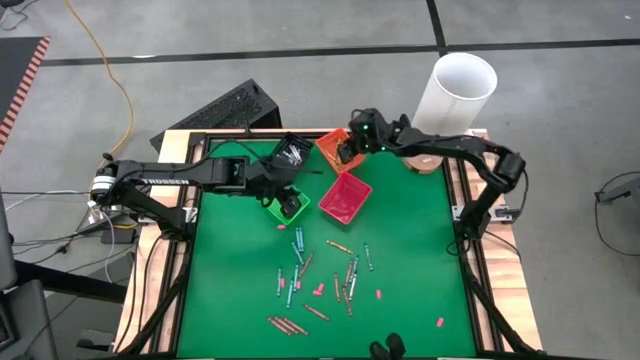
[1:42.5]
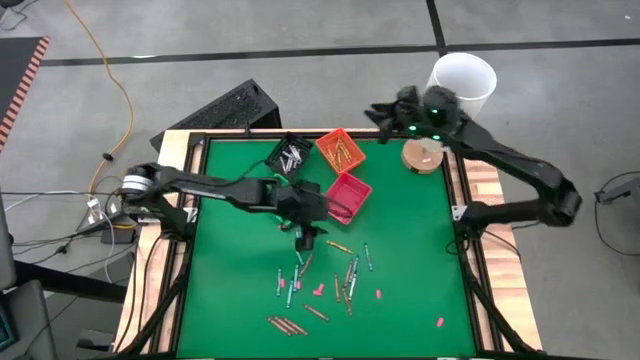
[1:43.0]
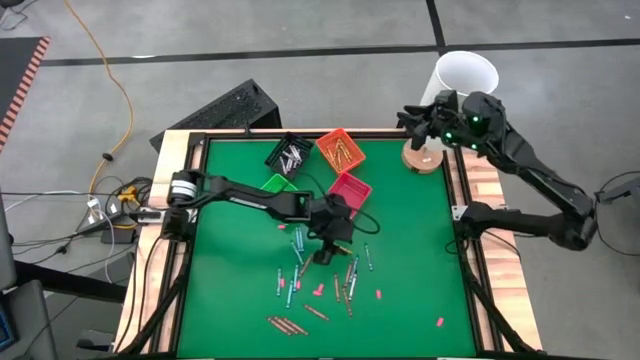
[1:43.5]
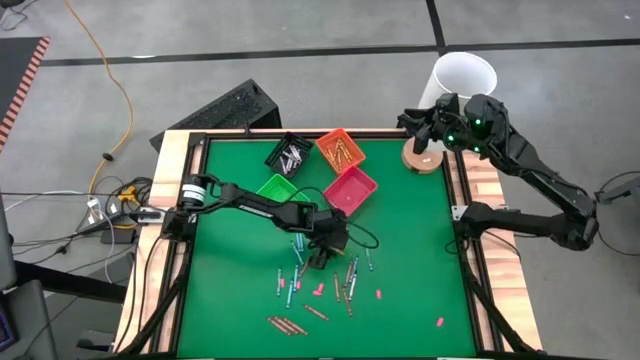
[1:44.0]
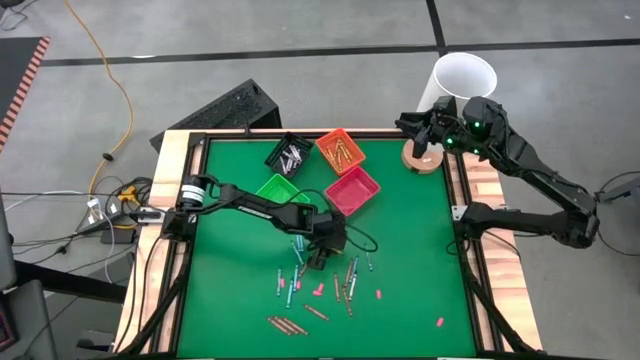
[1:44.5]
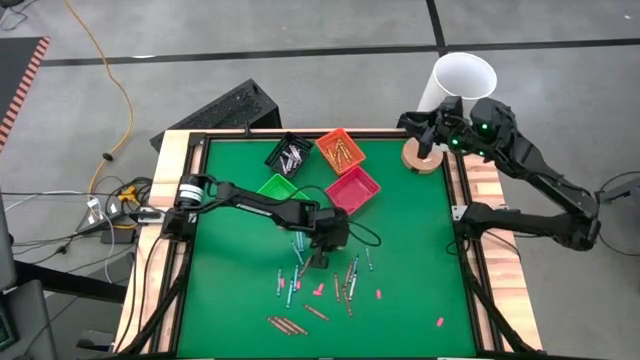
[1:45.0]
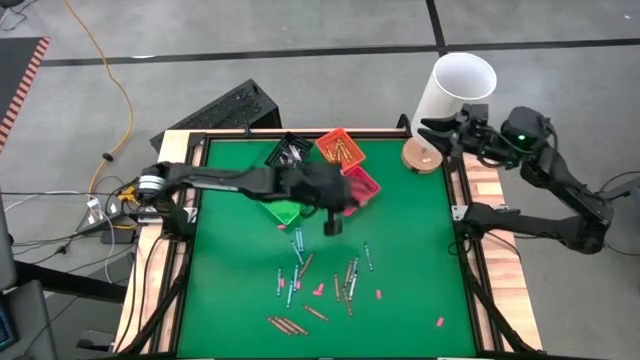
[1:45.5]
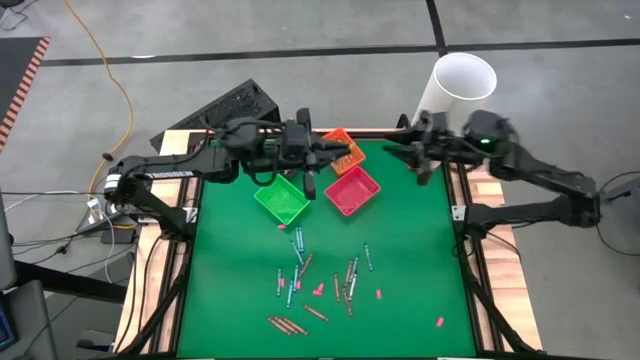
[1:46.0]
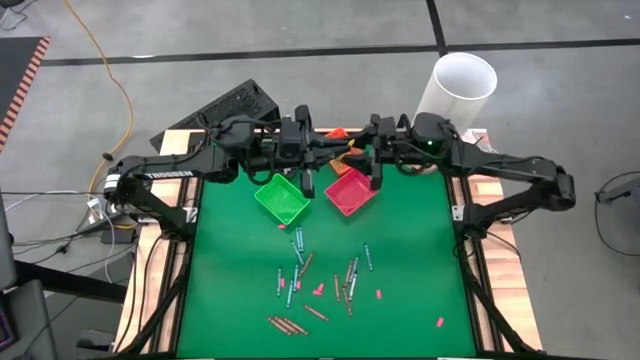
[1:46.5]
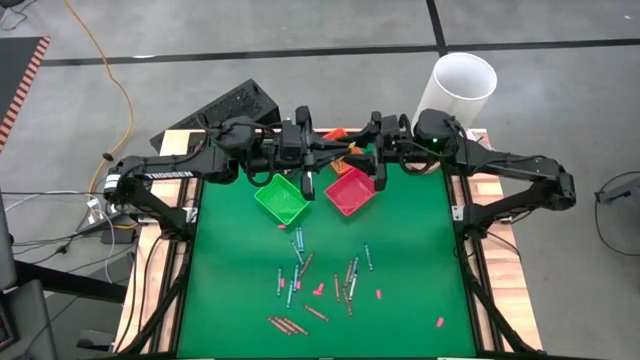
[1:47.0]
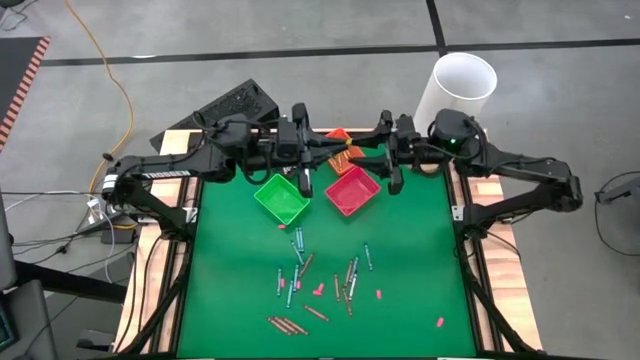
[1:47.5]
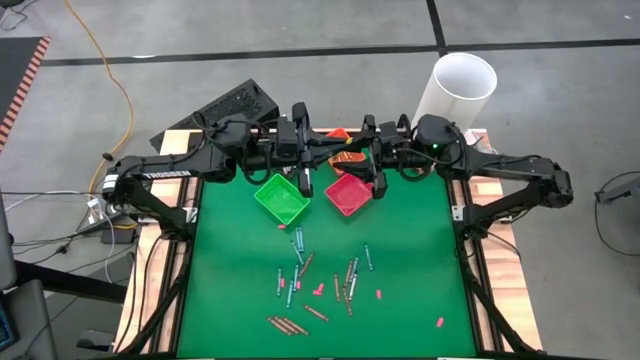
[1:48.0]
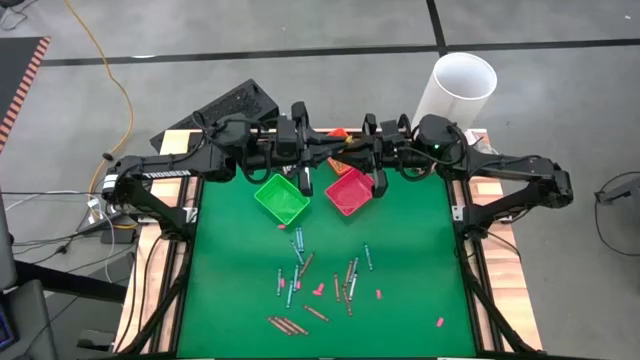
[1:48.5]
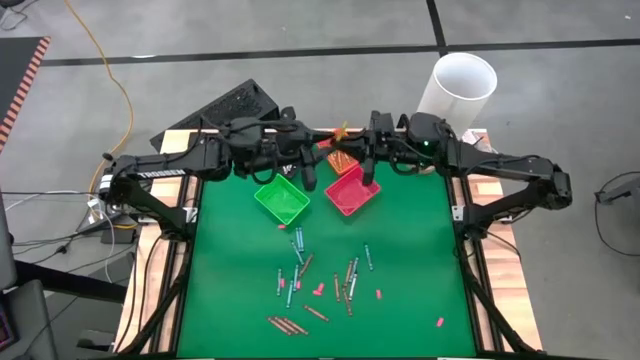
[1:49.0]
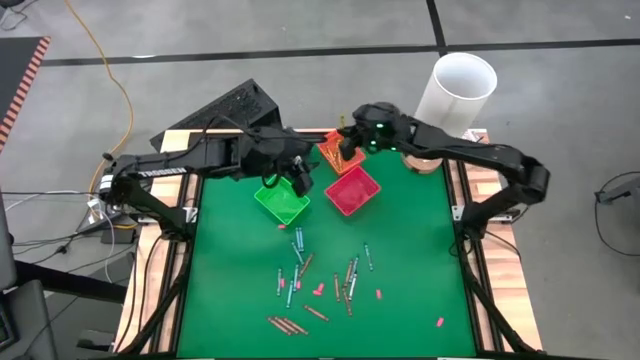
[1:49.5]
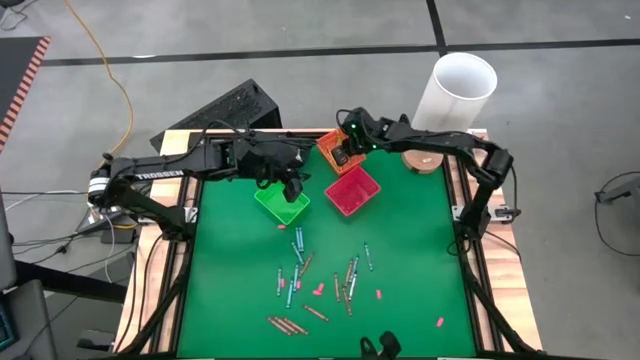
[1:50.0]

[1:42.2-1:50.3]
Task: Sort crayons
Put the yellow crayon into the bin

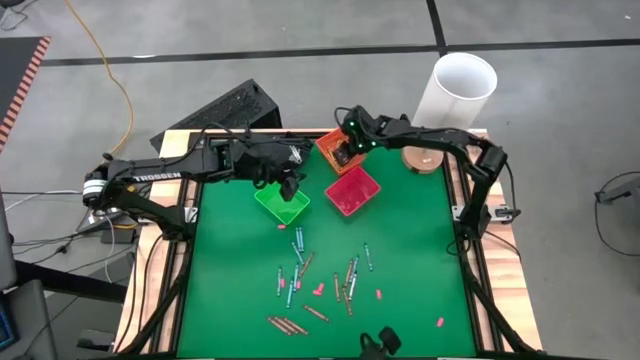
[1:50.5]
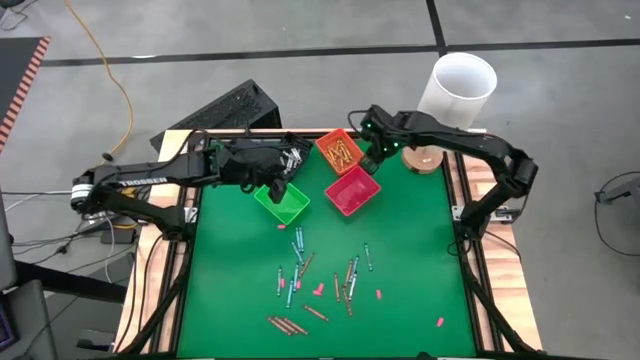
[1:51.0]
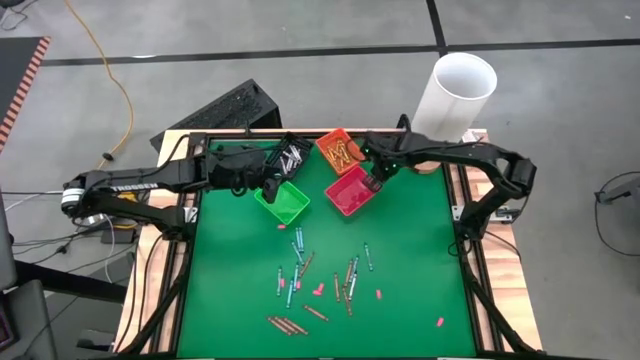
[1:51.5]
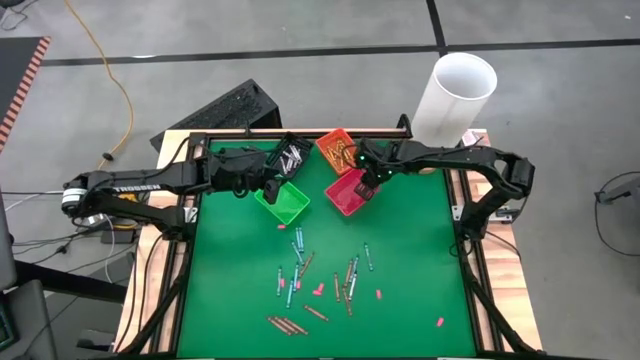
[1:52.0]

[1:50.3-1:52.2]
Adjust the red bin

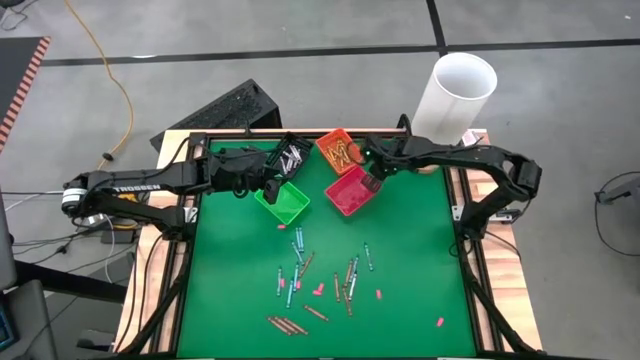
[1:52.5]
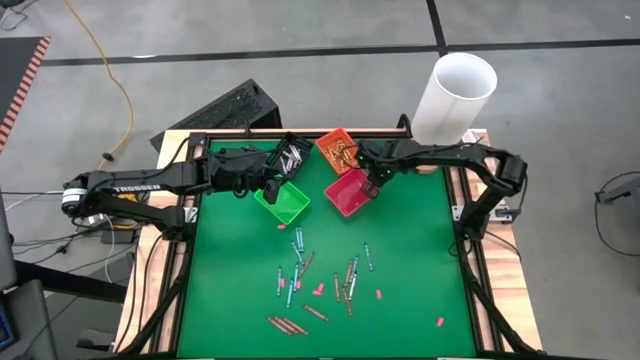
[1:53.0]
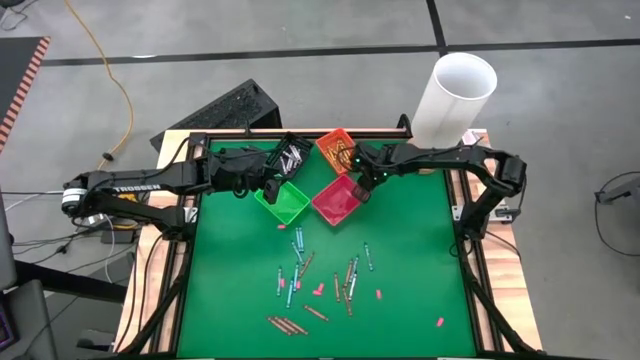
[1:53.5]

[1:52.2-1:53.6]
Adjust the red bin

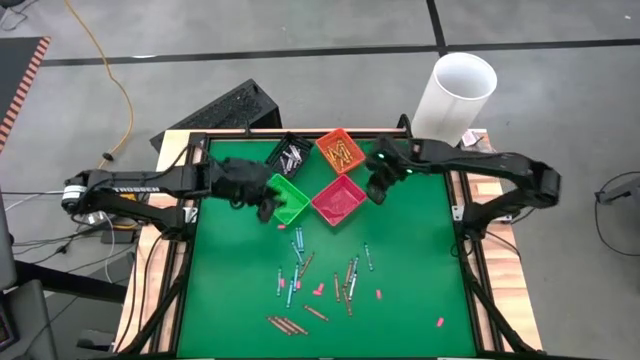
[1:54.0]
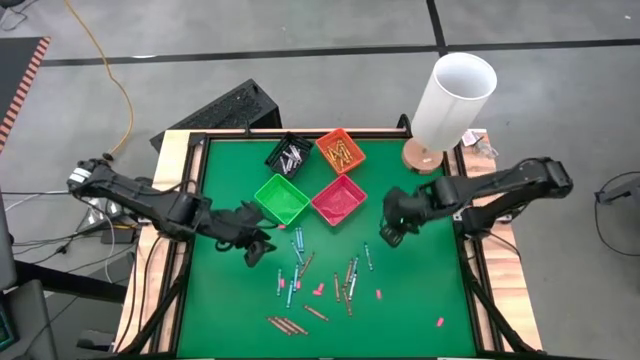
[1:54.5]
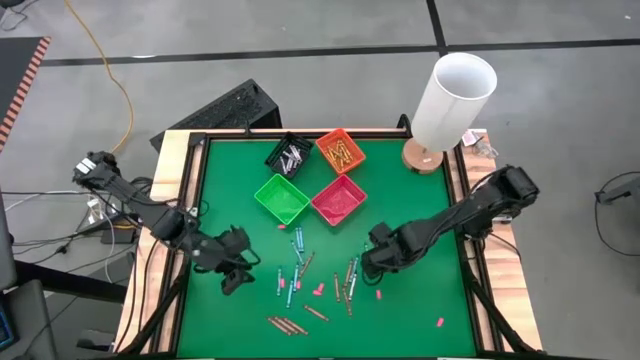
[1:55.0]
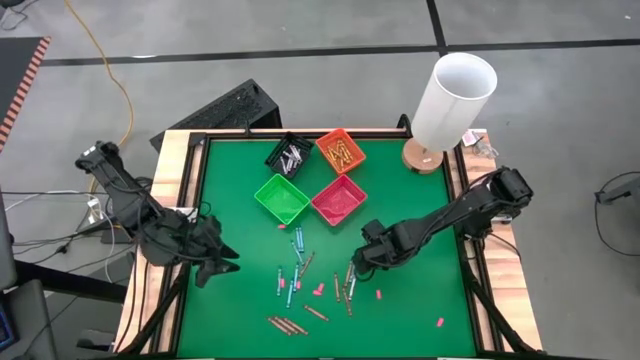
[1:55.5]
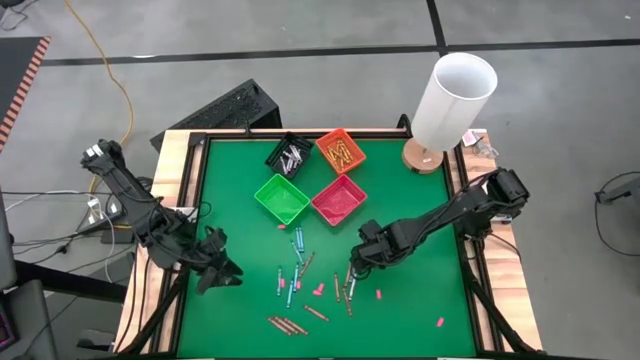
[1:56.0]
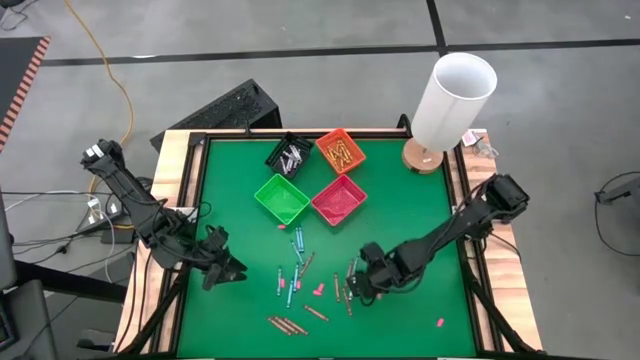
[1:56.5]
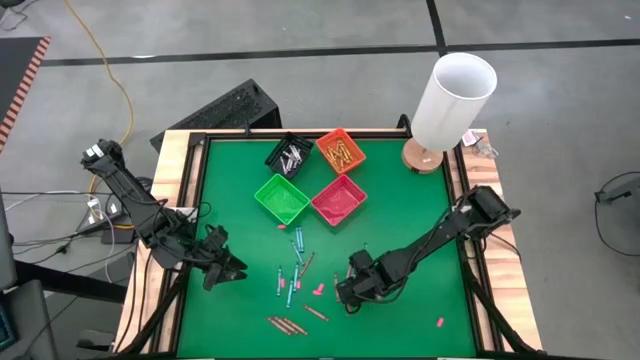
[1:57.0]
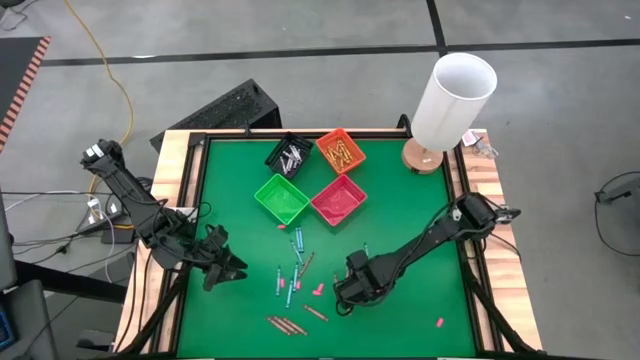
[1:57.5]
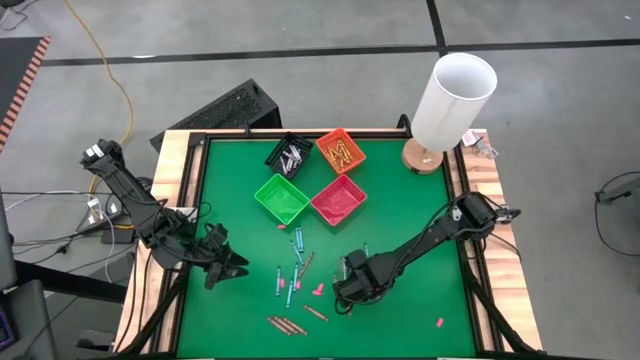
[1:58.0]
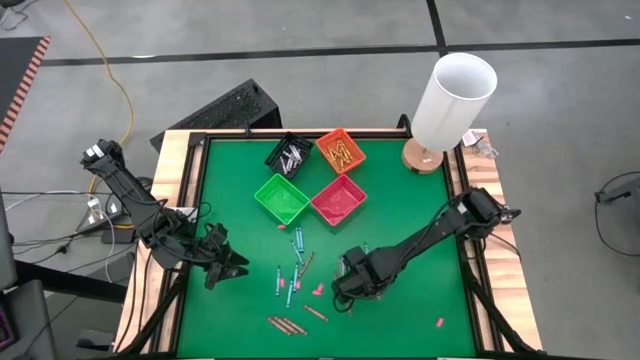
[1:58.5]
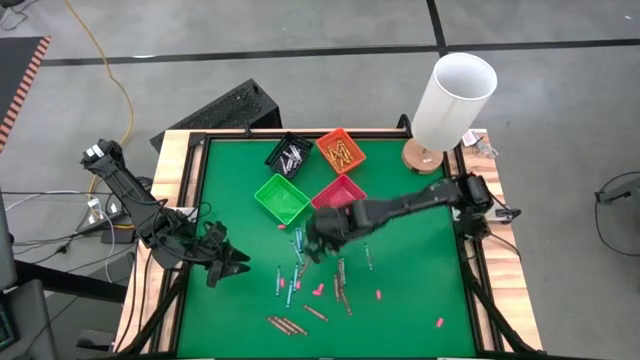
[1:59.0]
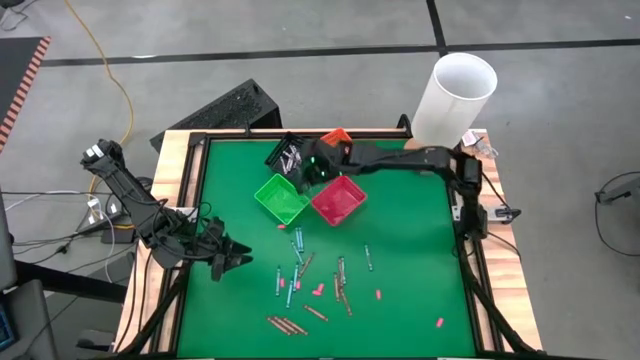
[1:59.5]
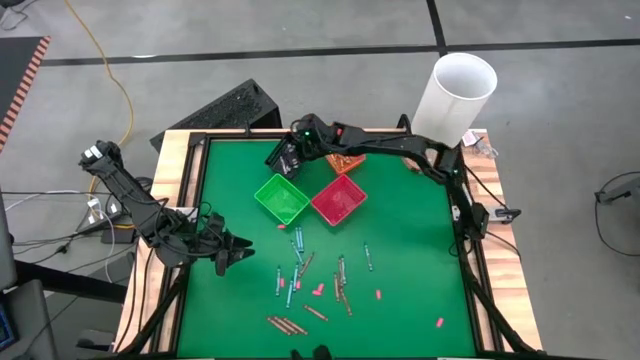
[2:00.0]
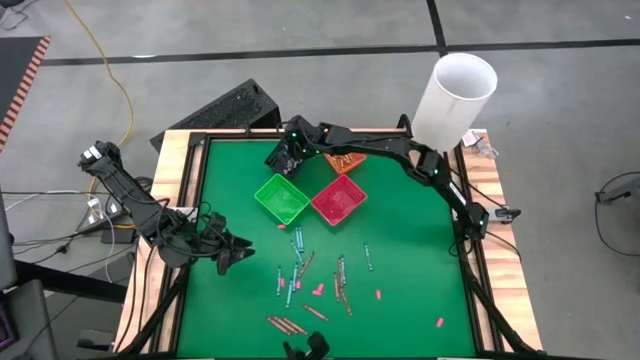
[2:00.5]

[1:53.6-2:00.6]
Put the black crayon into the black bin

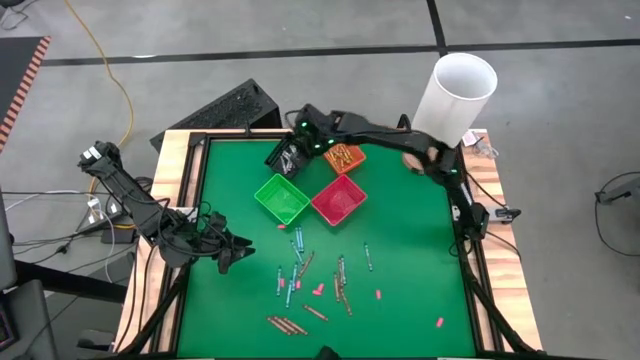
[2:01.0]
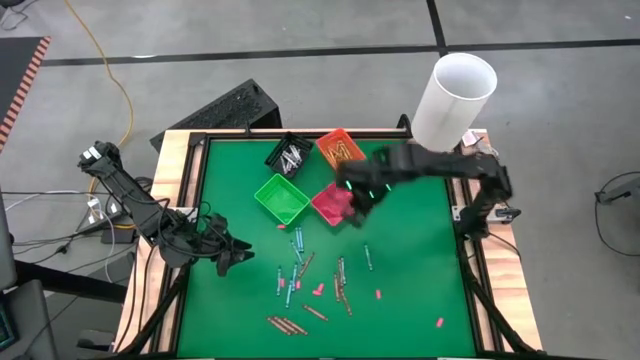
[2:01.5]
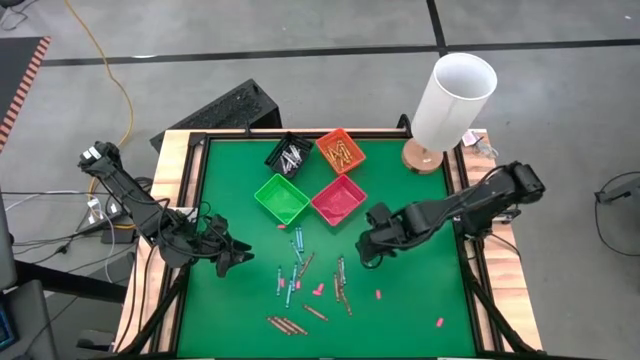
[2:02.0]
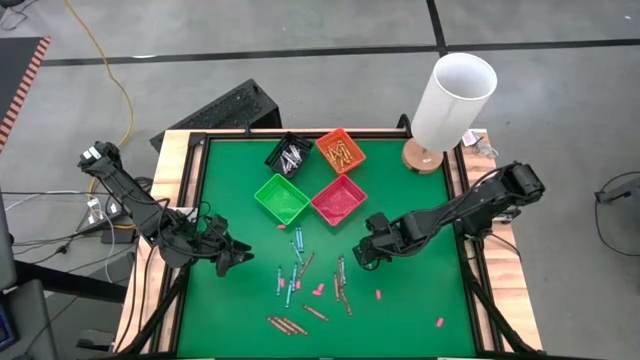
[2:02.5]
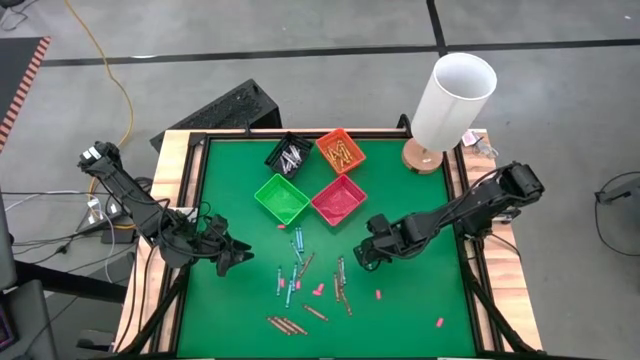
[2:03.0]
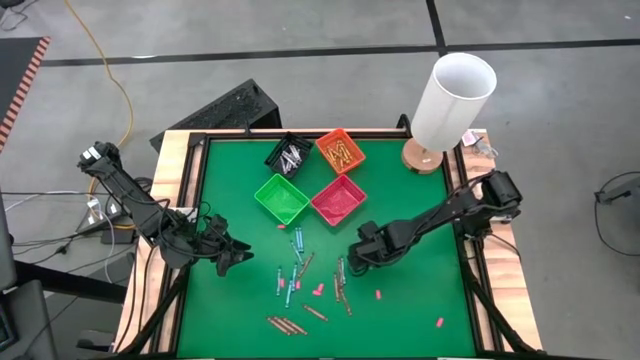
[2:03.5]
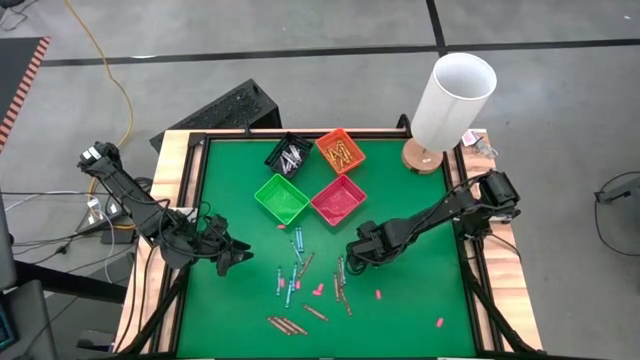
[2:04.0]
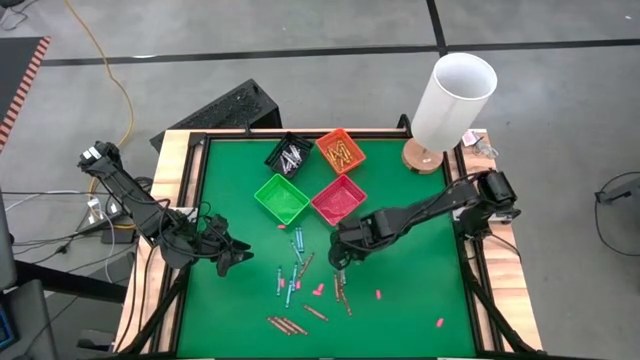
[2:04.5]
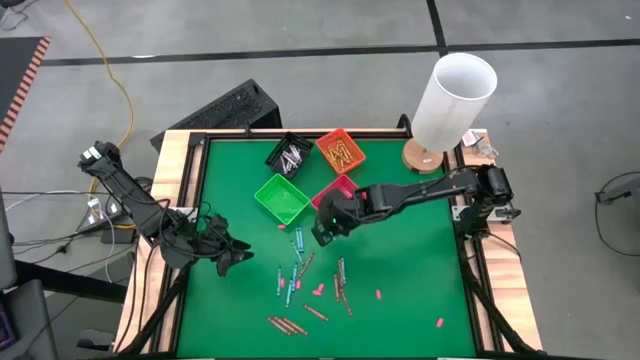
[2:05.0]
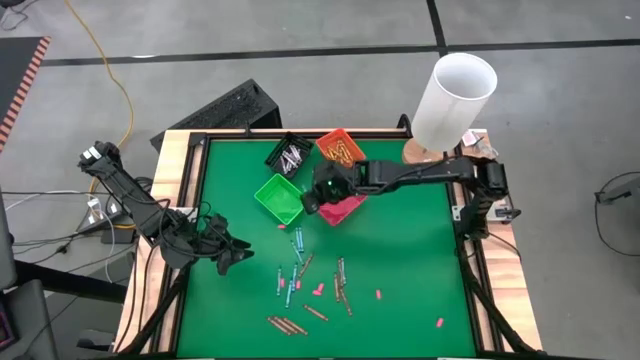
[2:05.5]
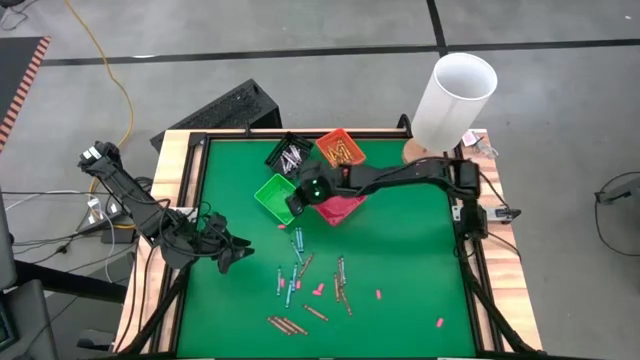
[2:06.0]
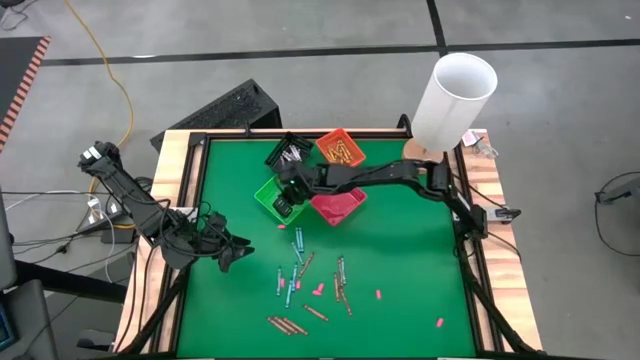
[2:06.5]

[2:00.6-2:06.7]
Put the blue crayon into the bin
